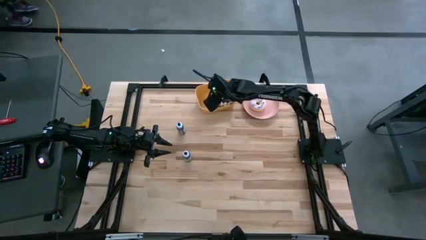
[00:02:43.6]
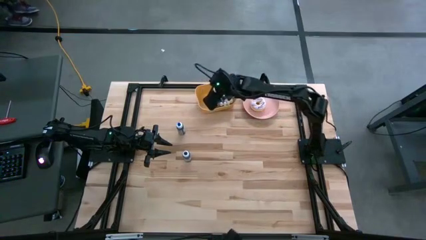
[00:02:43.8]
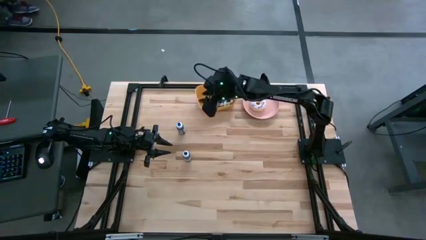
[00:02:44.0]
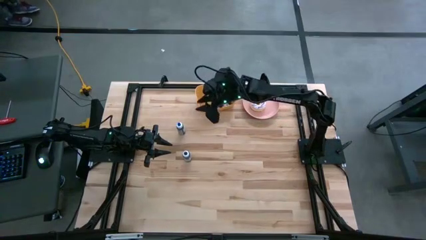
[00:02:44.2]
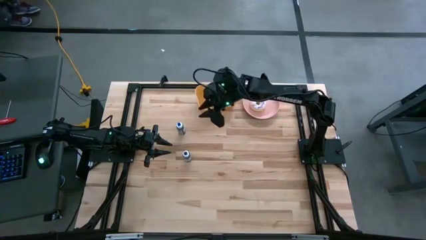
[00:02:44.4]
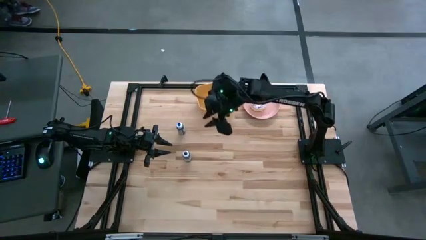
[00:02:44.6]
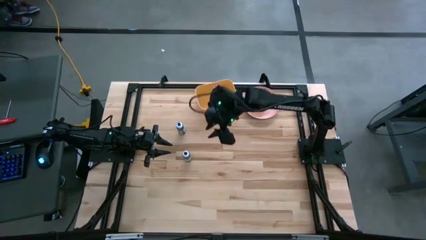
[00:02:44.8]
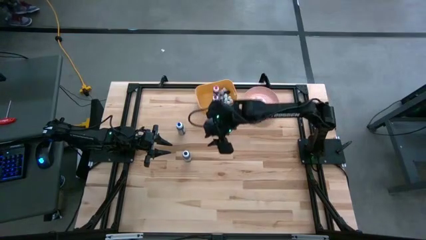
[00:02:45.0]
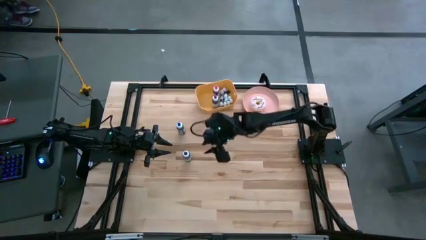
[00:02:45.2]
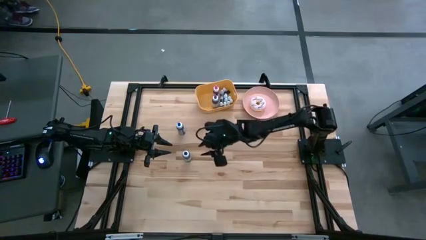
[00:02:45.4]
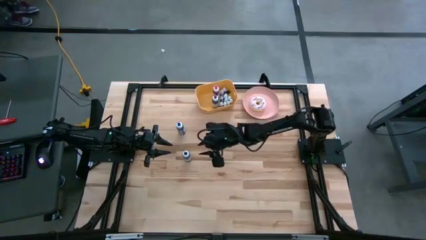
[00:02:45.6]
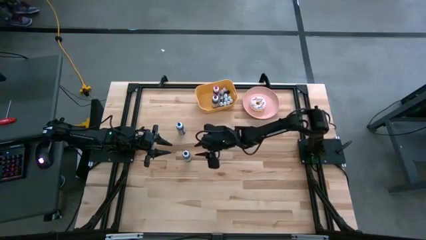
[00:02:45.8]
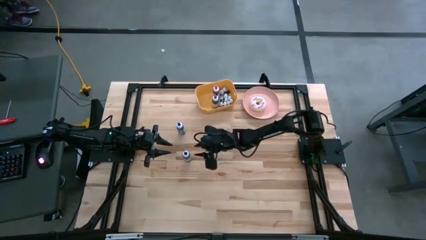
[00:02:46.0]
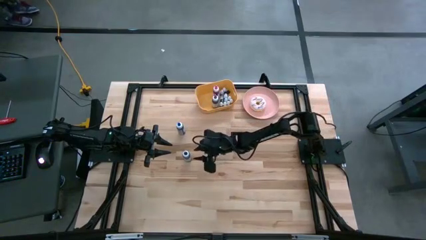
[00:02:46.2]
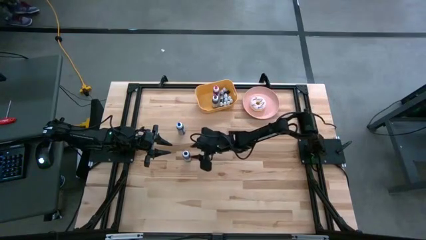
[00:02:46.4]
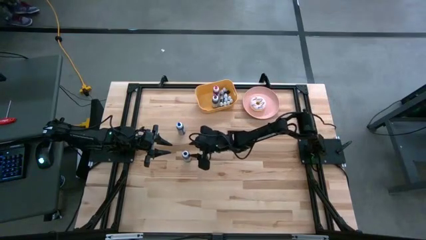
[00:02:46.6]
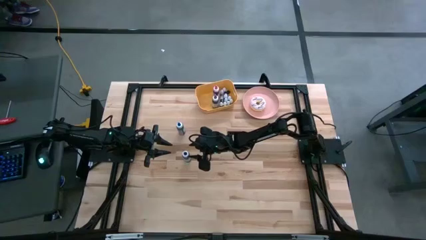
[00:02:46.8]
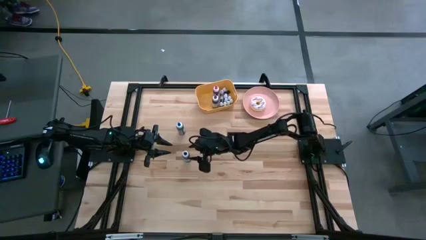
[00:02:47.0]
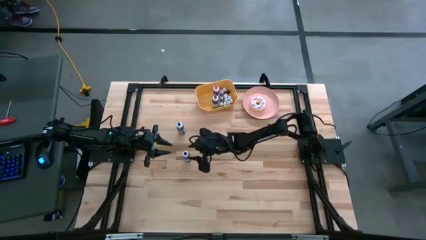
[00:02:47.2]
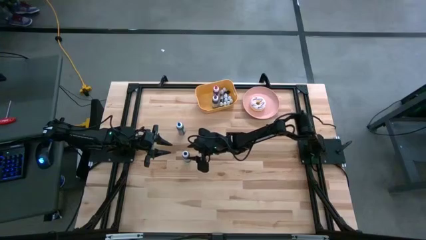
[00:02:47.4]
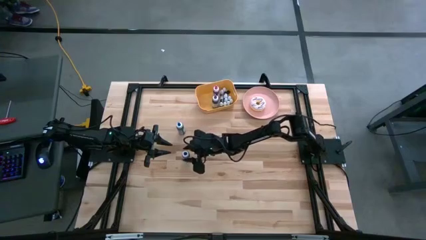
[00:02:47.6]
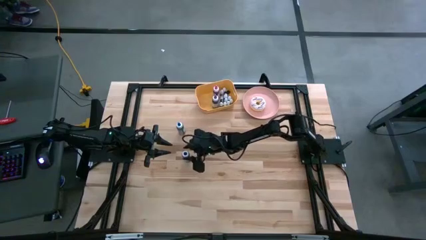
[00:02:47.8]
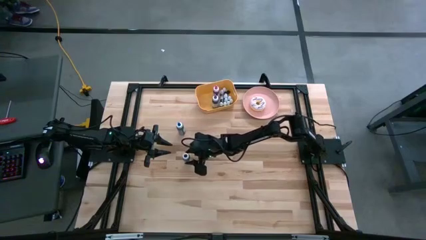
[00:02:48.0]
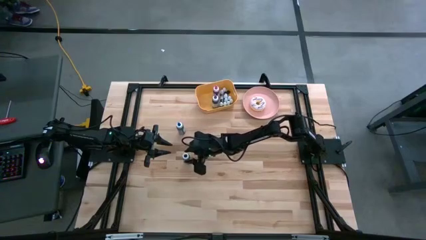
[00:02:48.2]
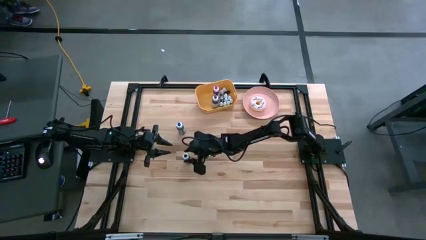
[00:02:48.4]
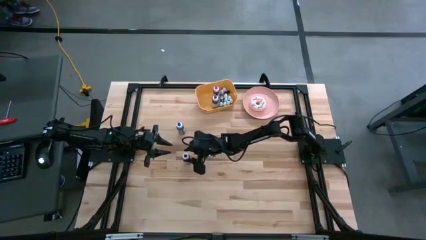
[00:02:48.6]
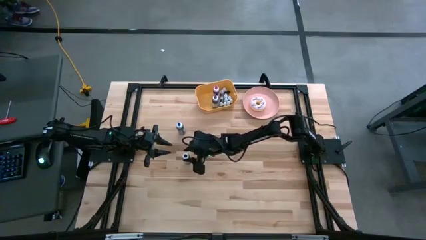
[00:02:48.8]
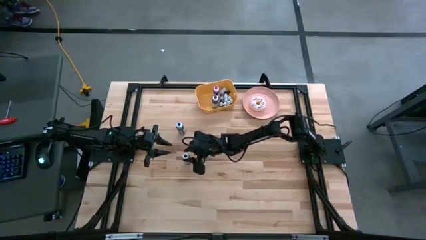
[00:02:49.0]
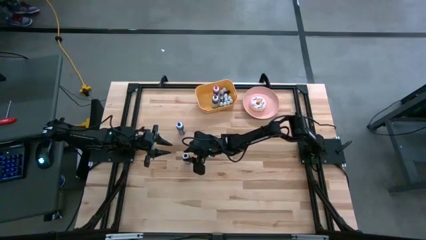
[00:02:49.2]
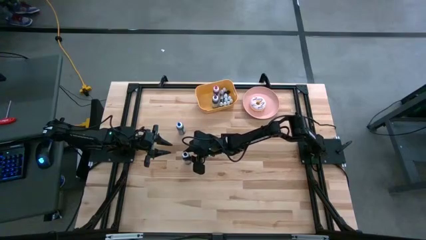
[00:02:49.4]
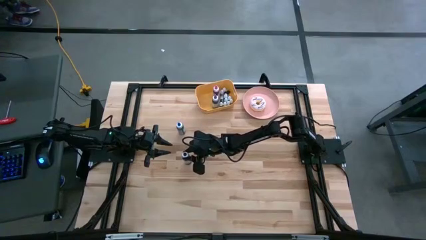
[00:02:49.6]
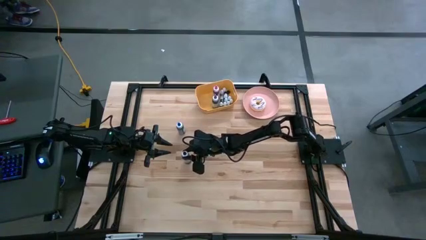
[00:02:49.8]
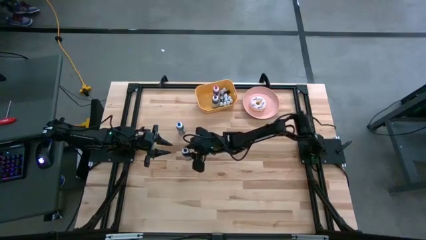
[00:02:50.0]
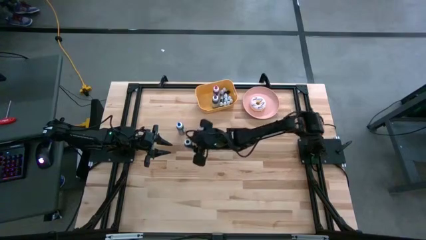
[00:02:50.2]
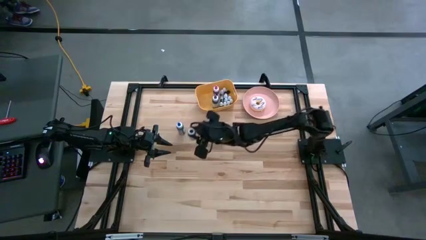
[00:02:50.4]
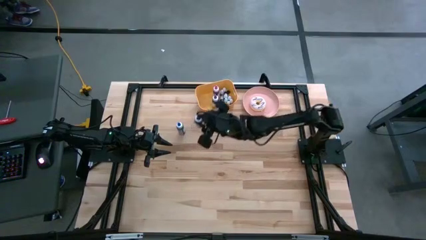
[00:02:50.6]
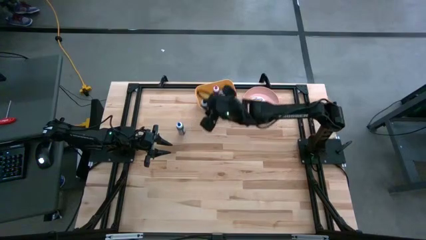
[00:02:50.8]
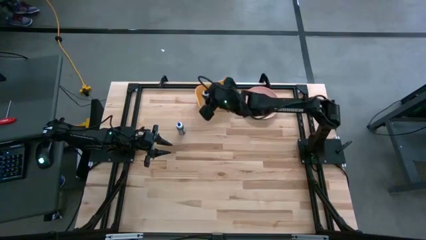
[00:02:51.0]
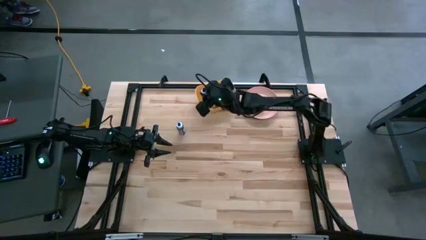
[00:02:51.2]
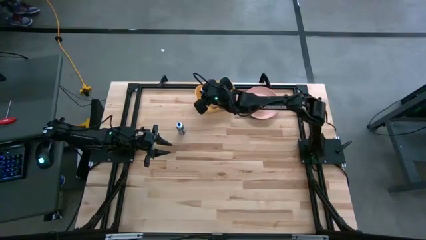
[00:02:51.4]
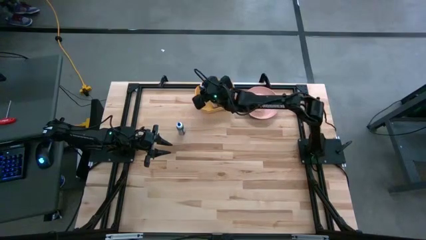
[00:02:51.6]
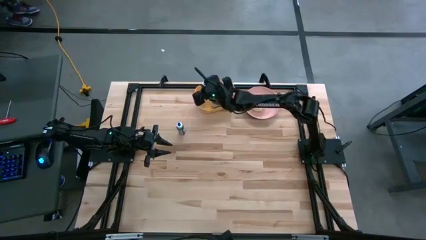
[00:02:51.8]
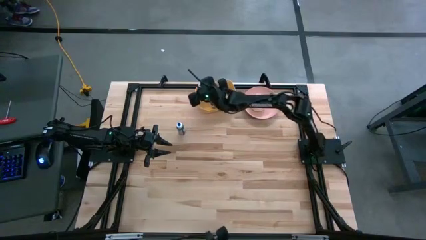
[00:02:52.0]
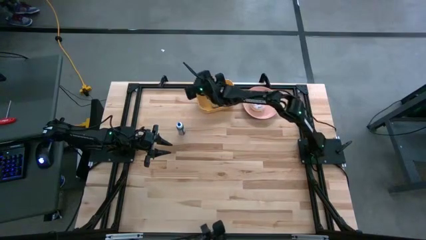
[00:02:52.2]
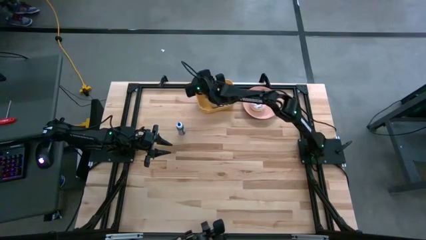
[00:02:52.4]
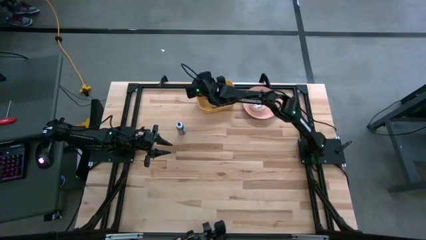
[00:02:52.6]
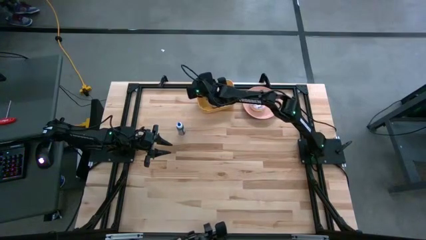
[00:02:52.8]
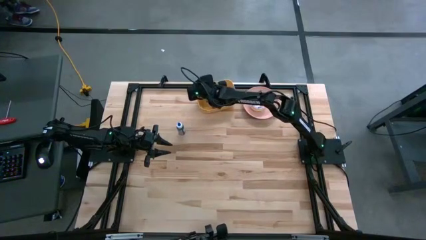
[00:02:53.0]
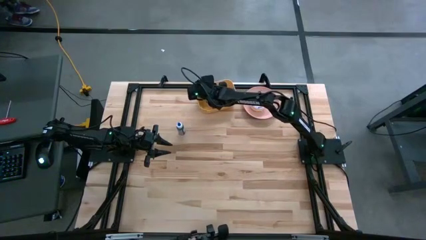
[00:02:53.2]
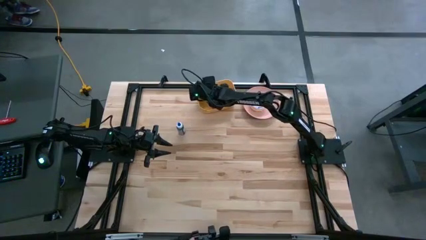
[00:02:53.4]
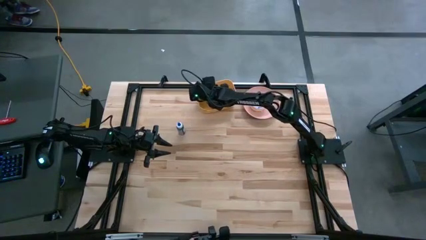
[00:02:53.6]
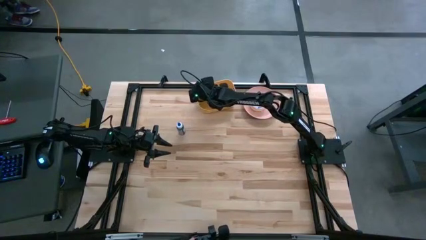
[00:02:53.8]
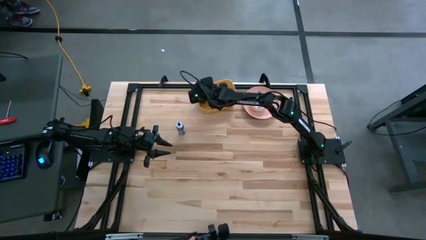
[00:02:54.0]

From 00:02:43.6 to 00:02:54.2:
Task: Pick & Place food coloring
Put the large black food coloring bottle into the yellow bin

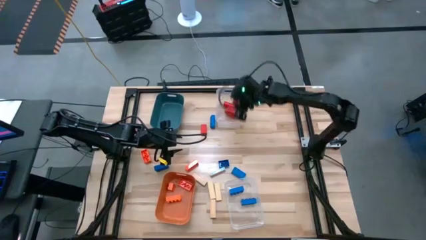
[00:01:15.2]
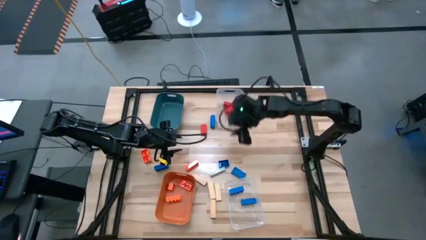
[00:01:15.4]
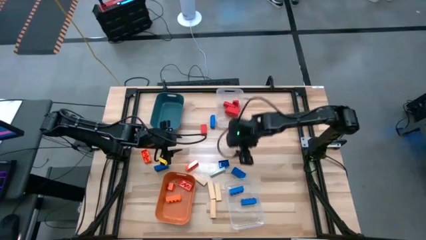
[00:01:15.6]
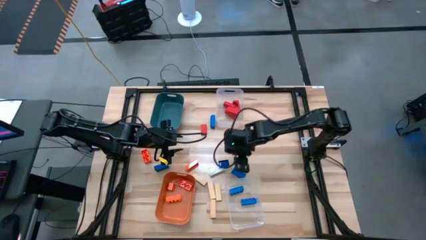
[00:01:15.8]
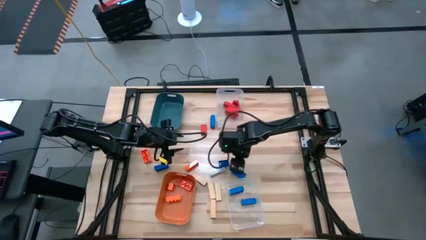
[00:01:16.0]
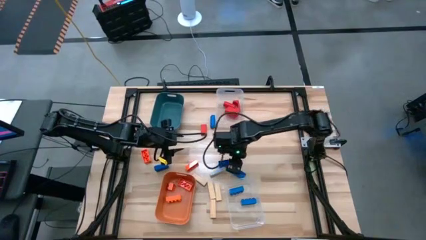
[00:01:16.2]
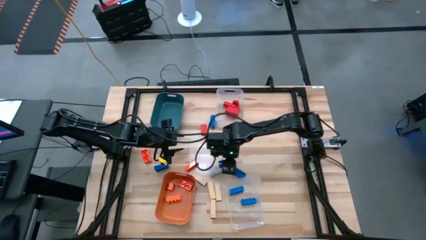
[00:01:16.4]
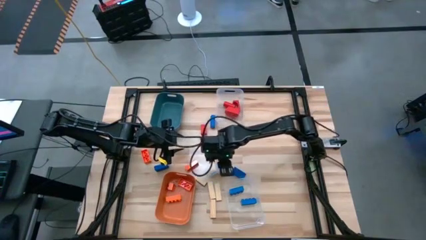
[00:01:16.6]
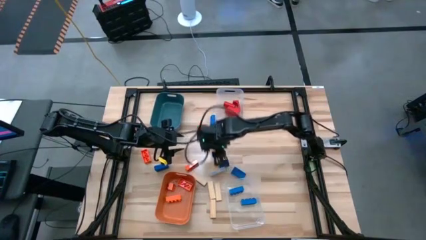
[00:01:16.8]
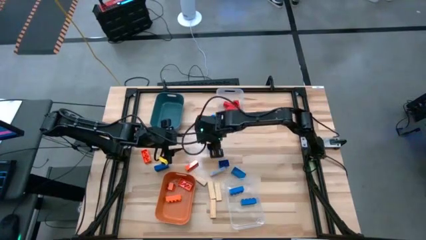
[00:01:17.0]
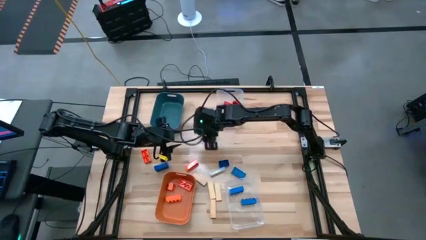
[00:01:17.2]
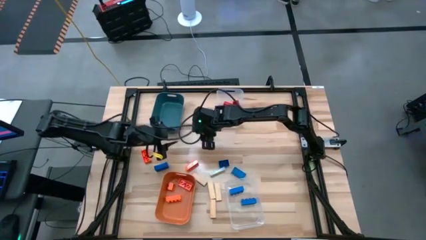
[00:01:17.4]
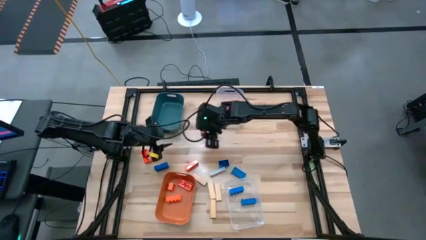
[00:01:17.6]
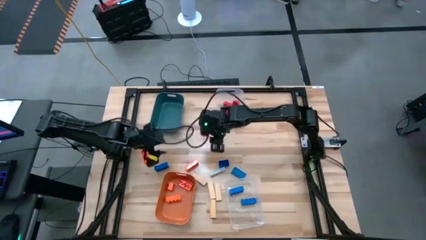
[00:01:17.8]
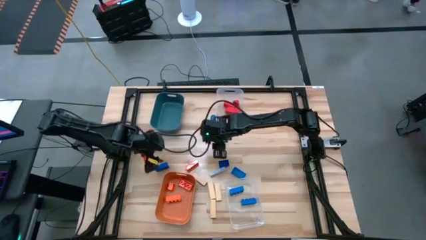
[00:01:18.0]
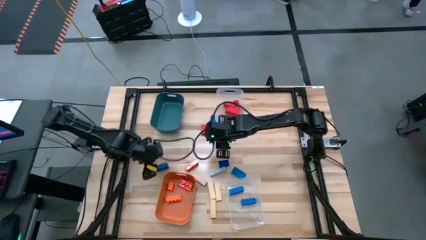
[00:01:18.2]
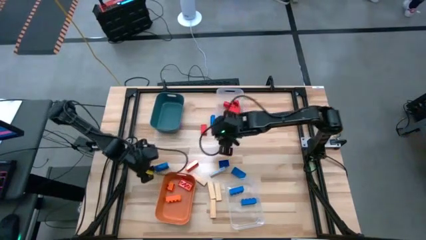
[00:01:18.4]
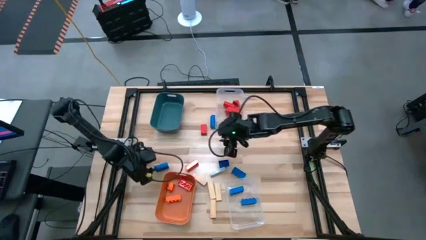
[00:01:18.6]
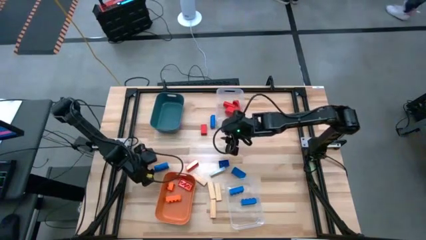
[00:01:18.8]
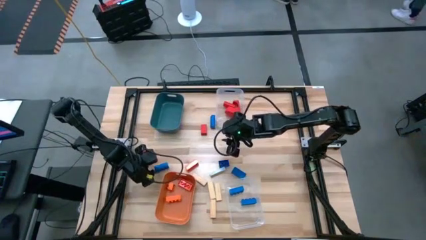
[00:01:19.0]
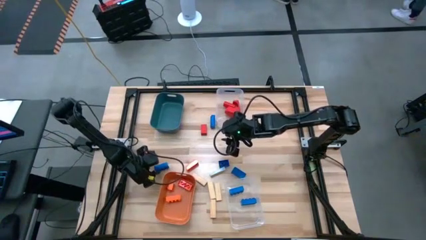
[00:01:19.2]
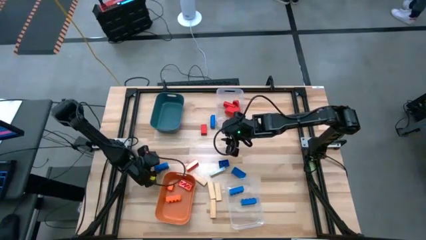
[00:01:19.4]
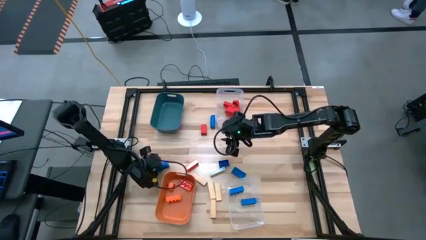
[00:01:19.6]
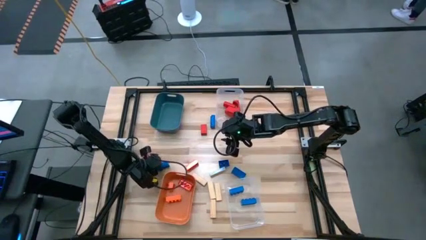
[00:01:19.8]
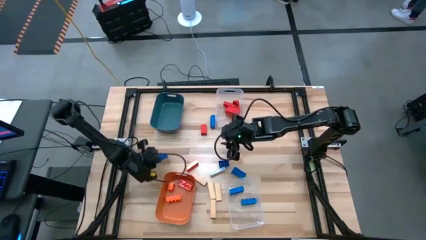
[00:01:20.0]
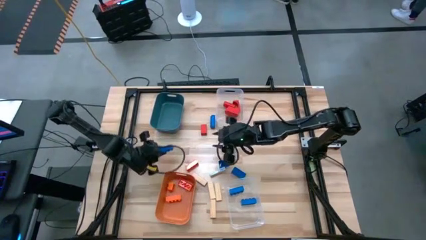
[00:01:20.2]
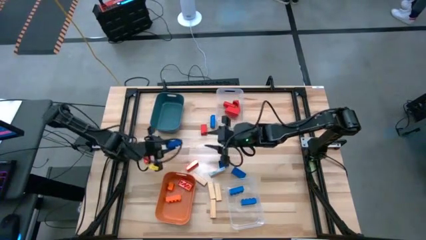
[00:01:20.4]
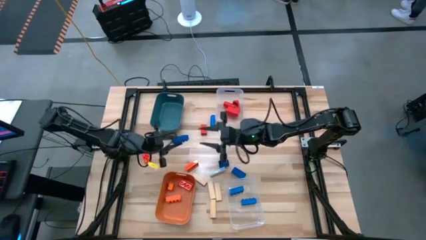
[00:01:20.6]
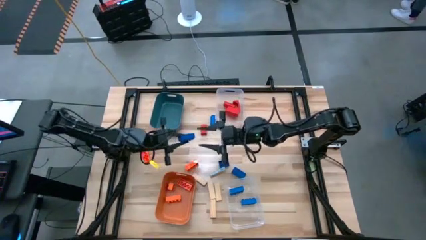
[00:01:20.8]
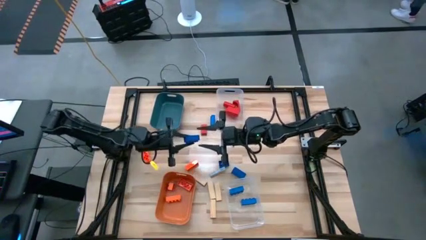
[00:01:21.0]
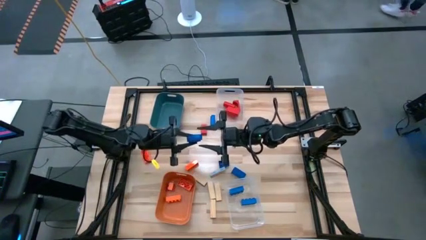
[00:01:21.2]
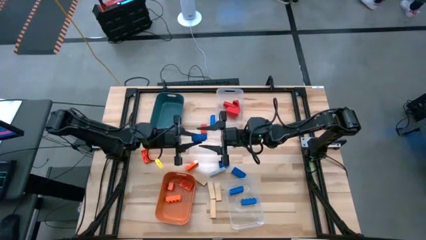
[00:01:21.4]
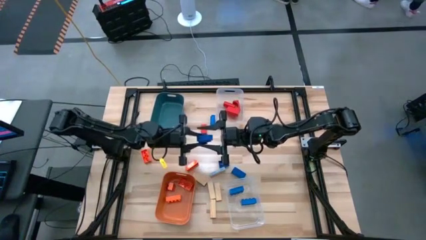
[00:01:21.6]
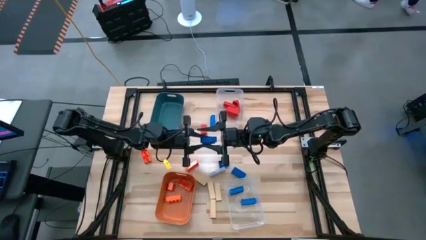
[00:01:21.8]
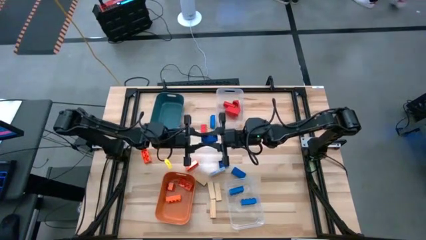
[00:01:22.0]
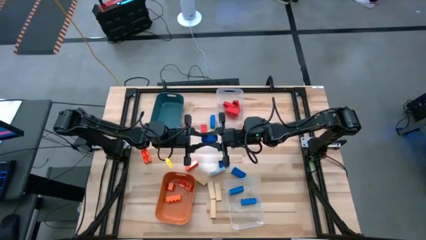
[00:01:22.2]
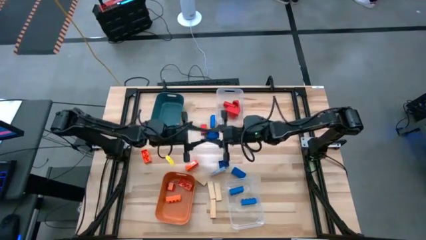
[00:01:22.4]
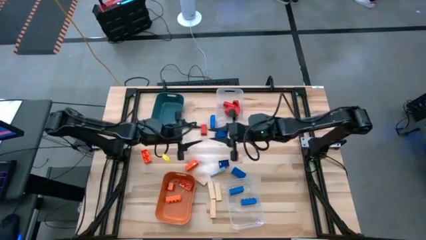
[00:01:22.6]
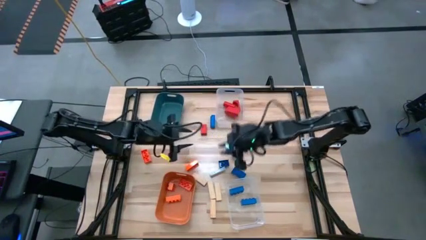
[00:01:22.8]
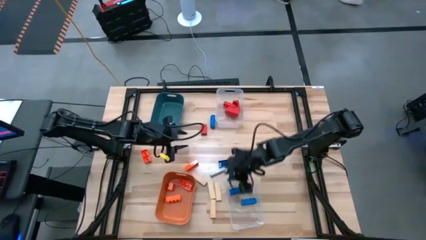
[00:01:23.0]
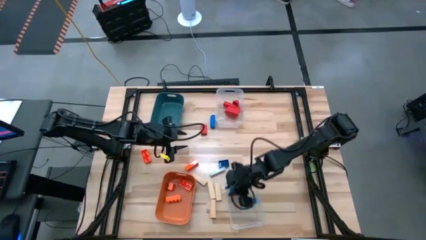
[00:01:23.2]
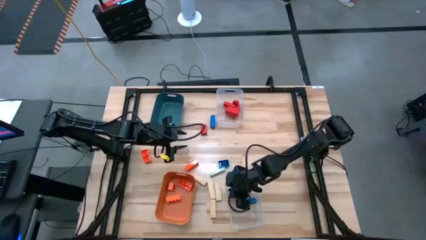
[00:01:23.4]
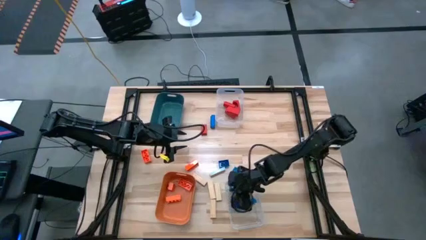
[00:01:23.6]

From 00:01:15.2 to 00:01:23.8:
Task: Sort blocks
Put the blue game piece into the bottom transparent bin
